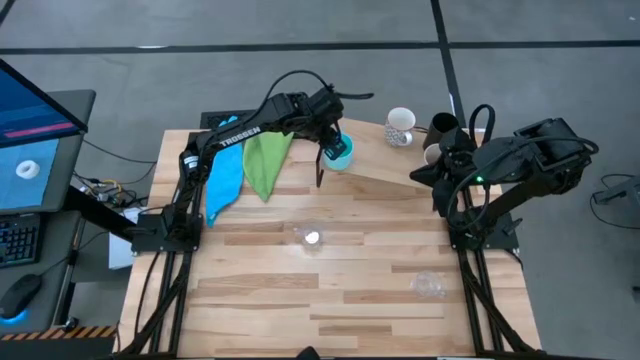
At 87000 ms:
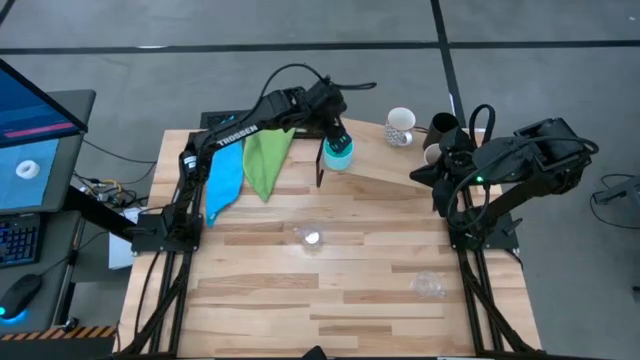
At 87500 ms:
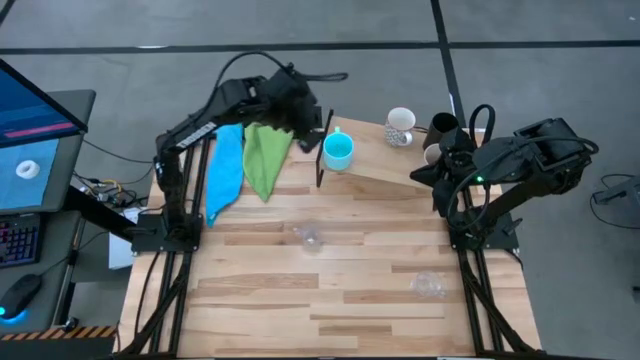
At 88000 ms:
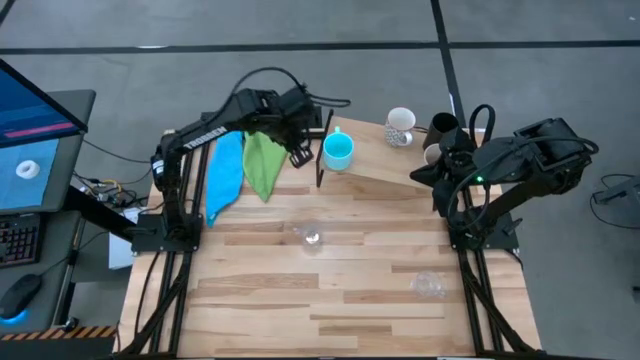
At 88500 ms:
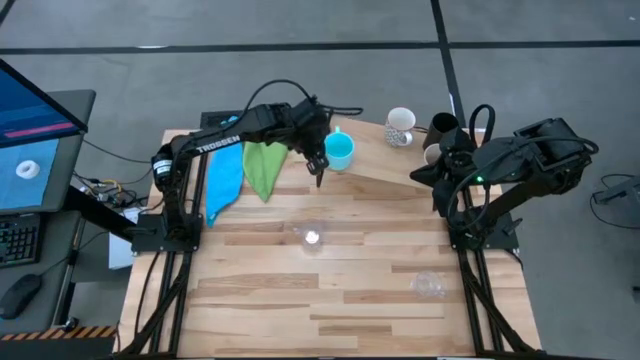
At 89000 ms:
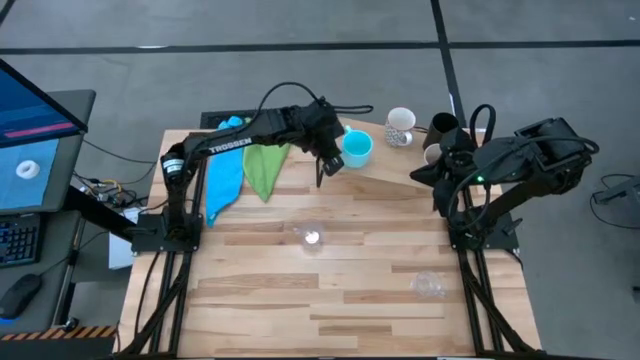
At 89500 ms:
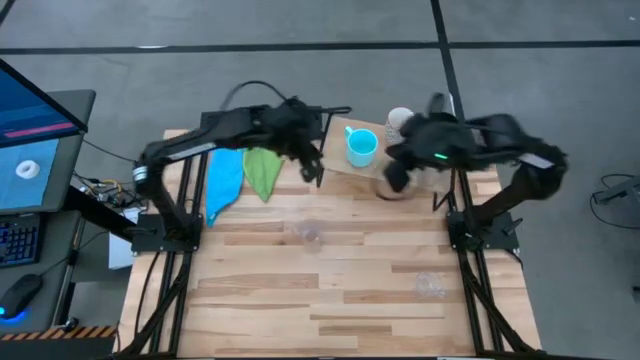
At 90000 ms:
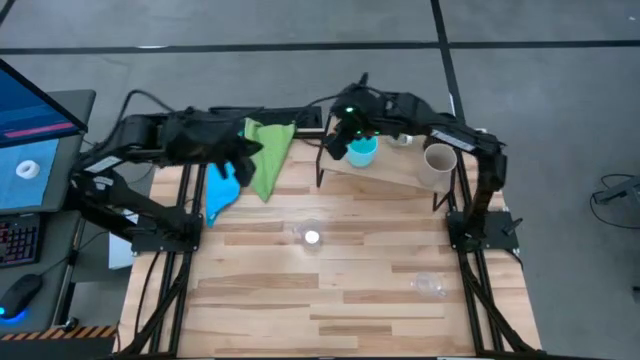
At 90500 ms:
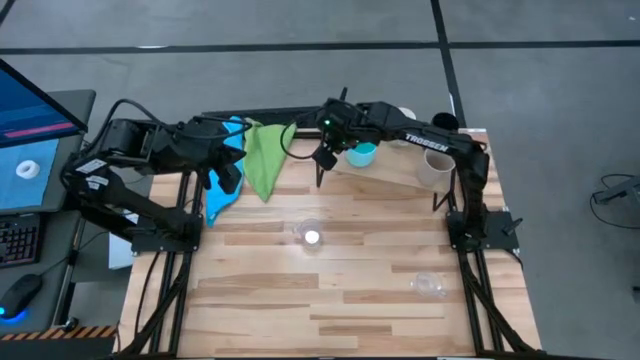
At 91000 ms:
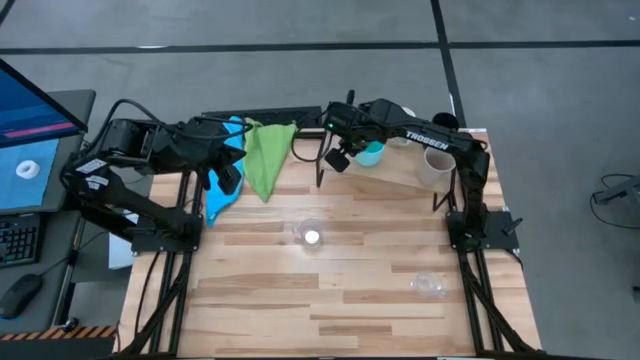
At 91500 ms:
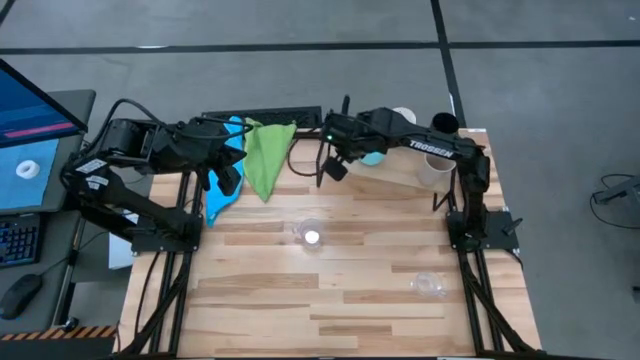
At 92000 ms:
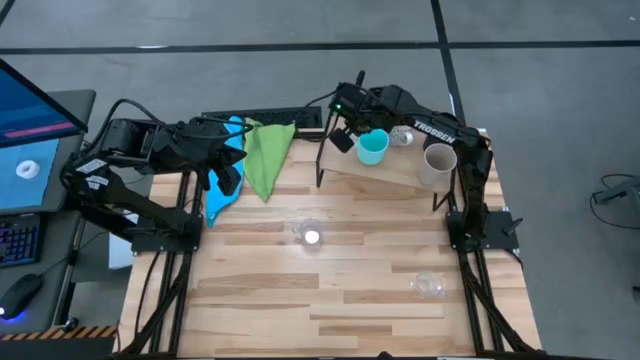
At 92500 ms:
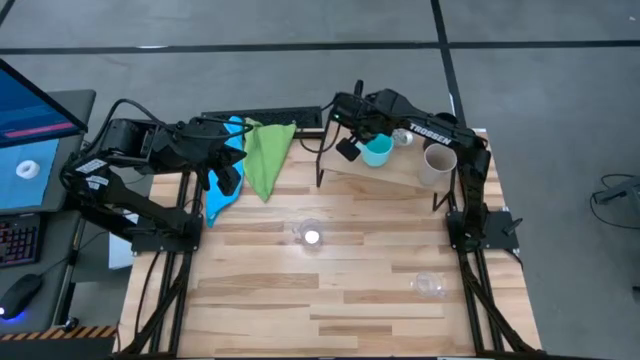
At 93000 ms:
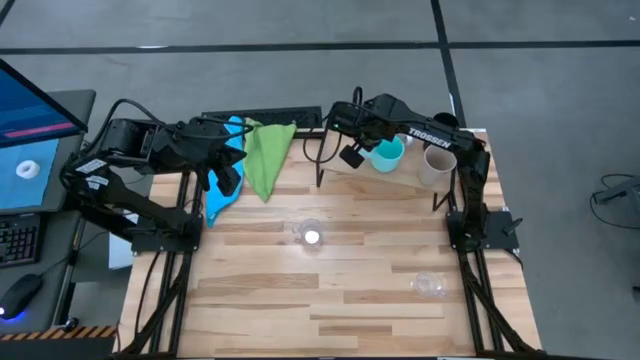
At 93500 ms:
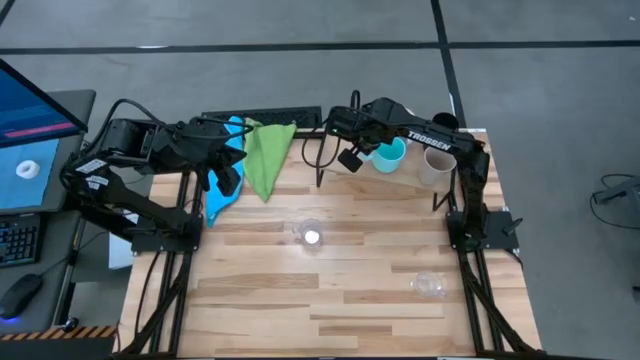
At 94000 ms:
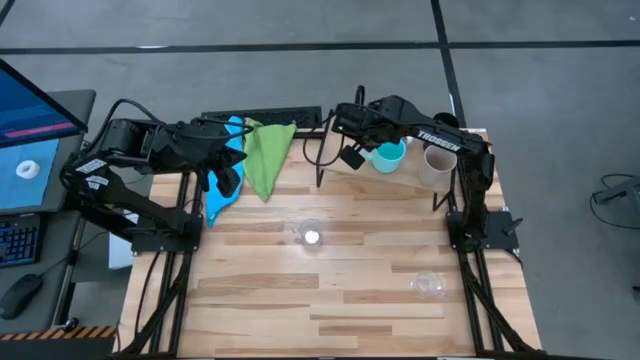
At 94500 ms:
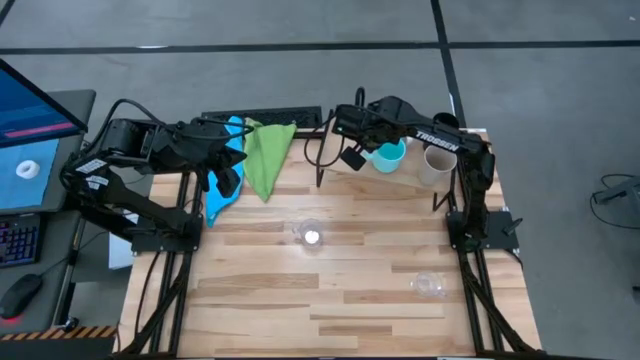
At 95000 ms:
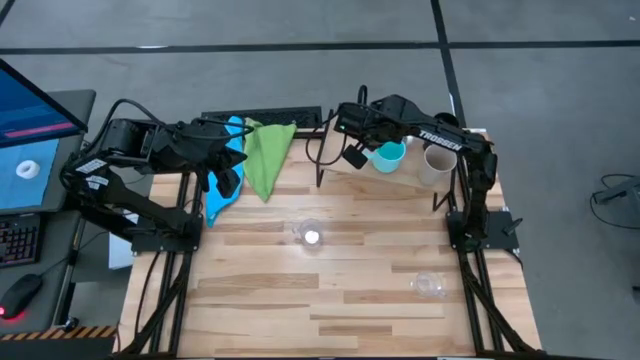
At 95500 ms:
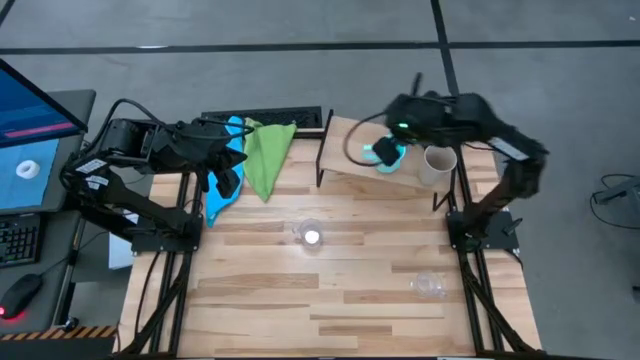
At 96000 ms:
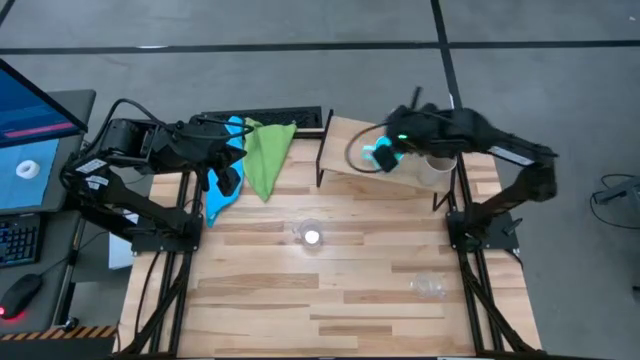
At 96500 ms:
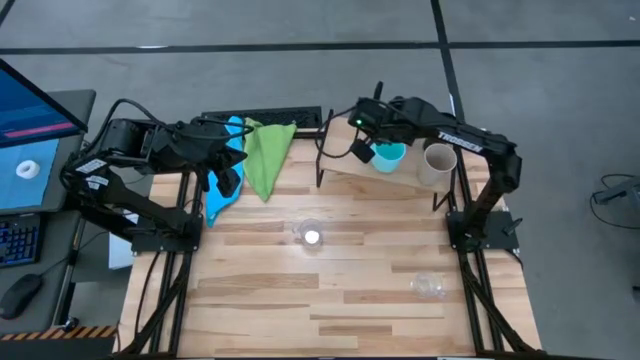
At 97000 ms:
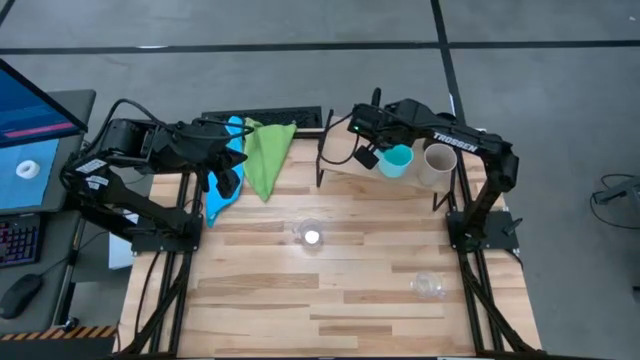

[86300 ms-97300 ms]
Task: Stack small to large cups/mugs on shelf
Move the blue mug to the center of the shelf

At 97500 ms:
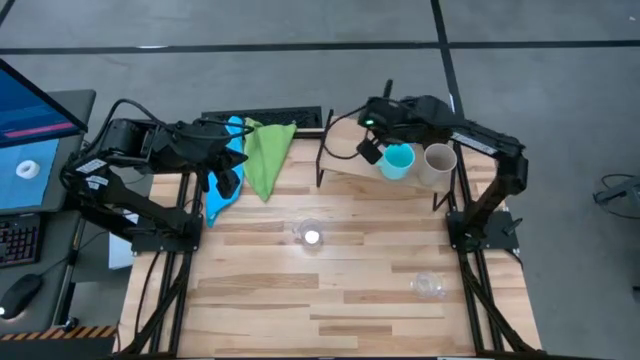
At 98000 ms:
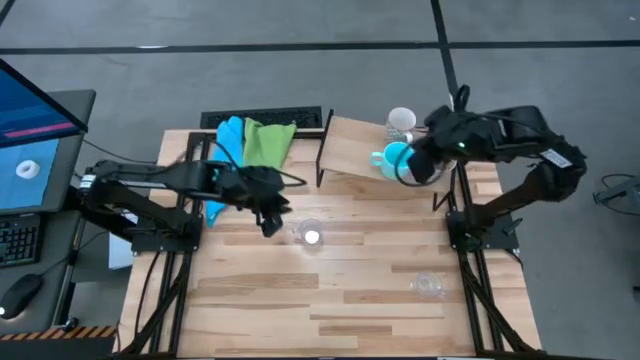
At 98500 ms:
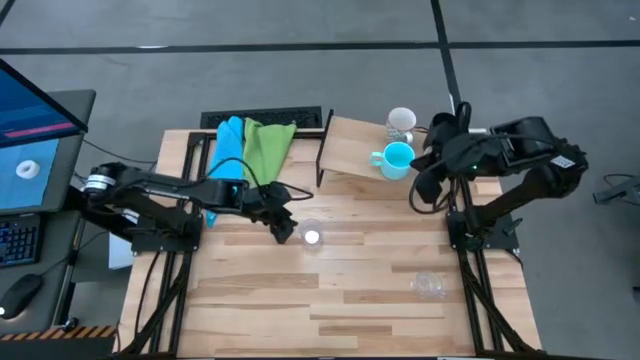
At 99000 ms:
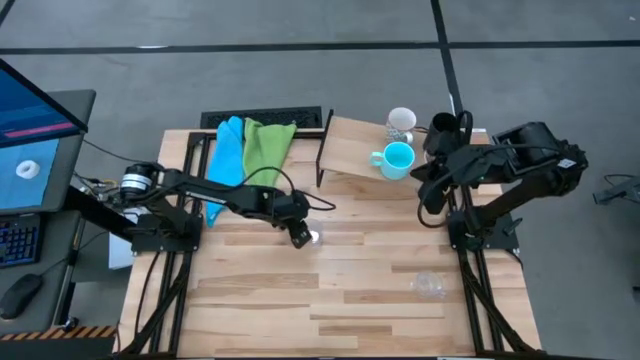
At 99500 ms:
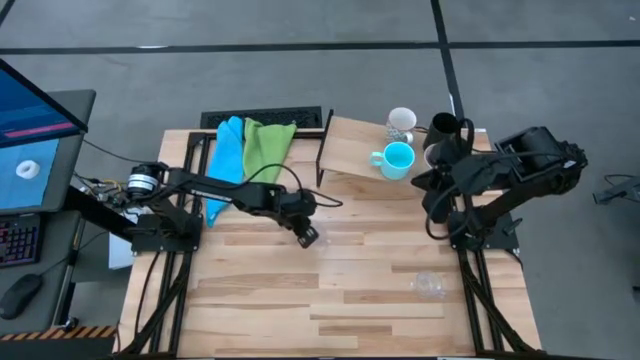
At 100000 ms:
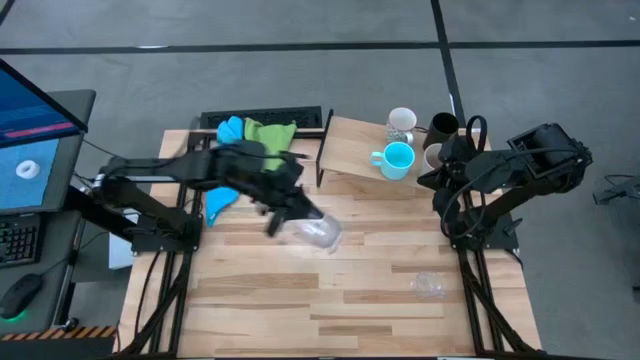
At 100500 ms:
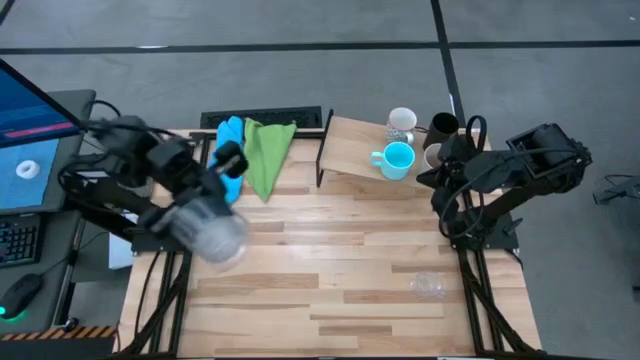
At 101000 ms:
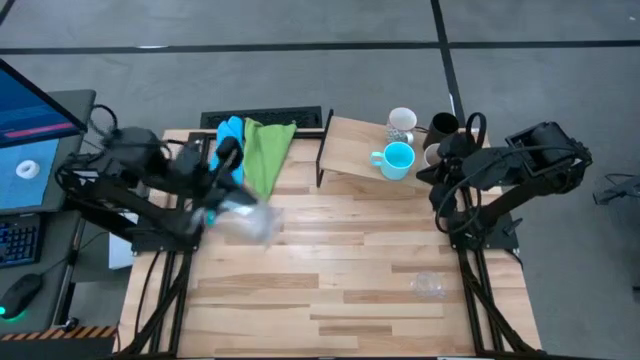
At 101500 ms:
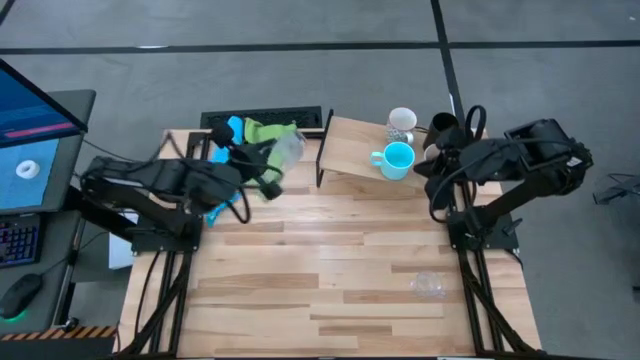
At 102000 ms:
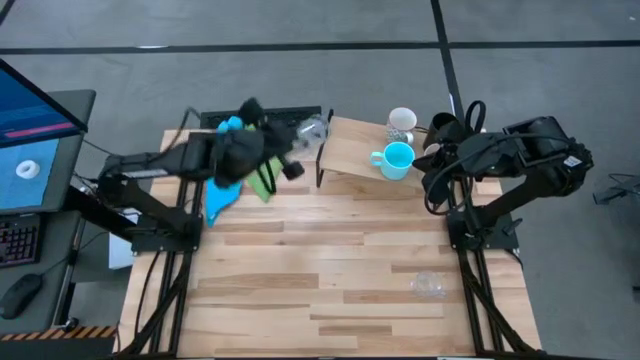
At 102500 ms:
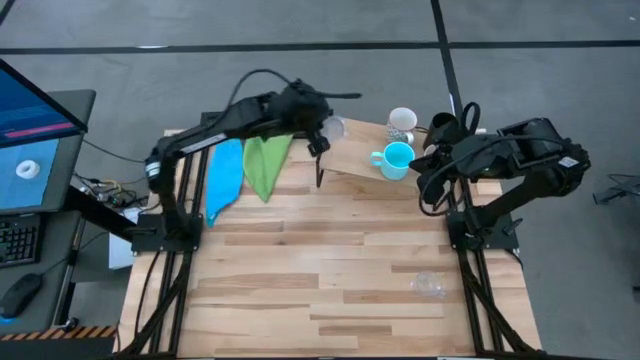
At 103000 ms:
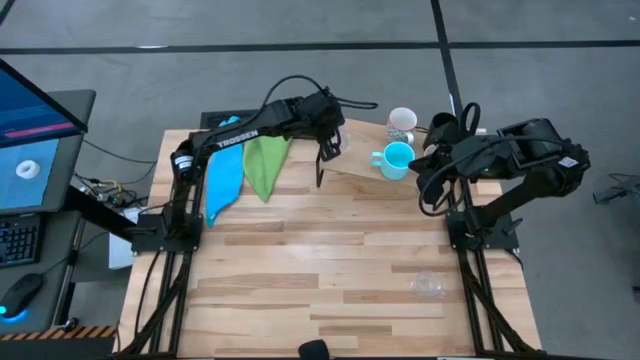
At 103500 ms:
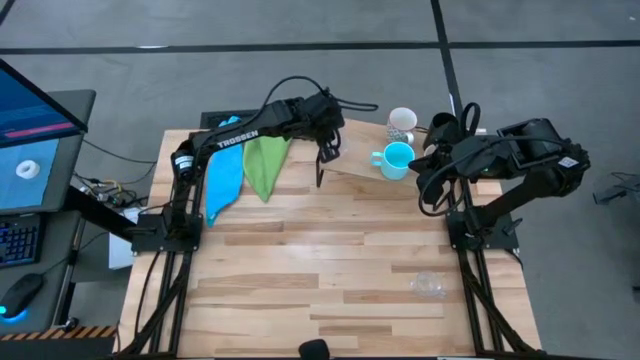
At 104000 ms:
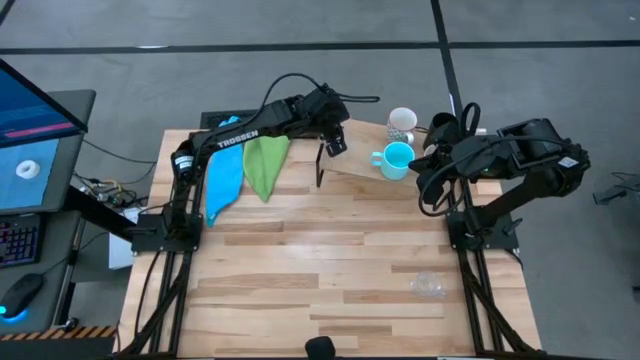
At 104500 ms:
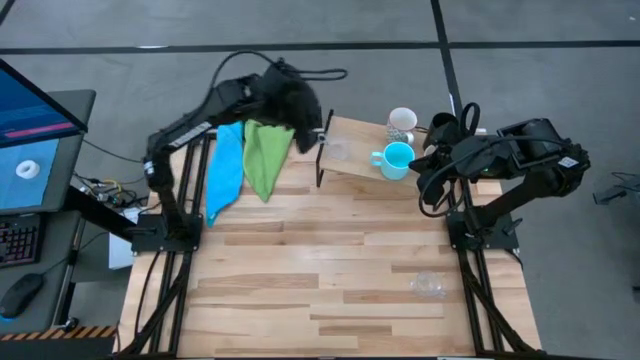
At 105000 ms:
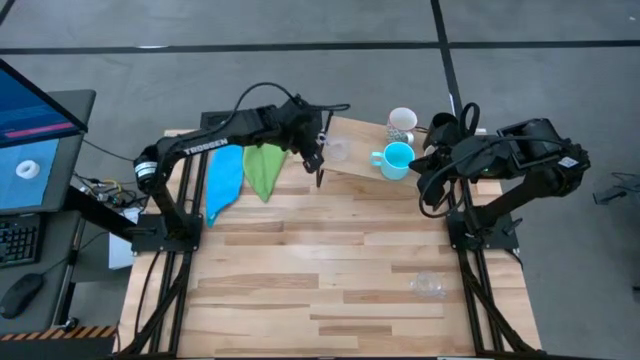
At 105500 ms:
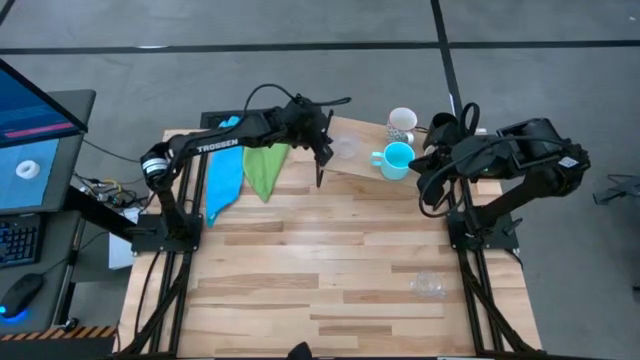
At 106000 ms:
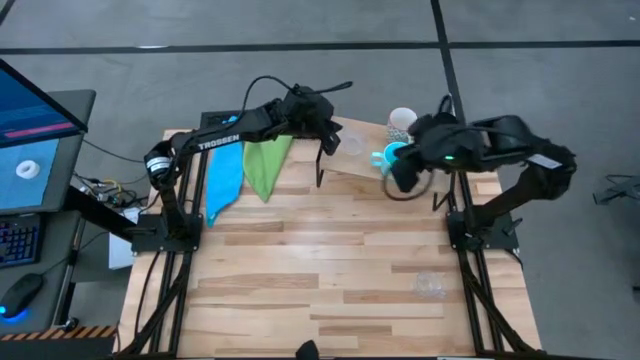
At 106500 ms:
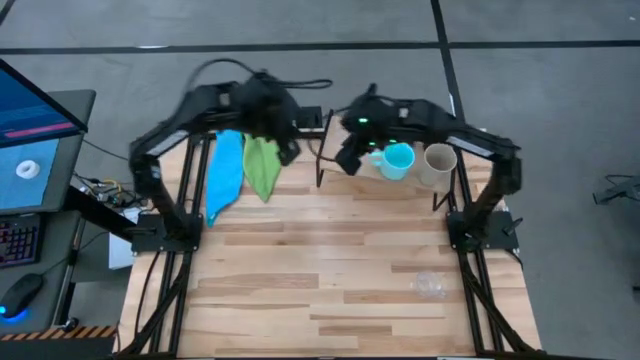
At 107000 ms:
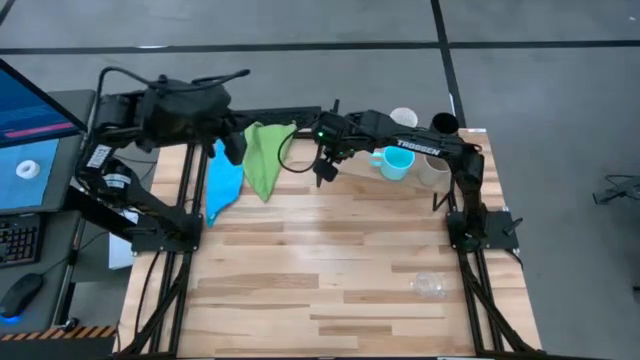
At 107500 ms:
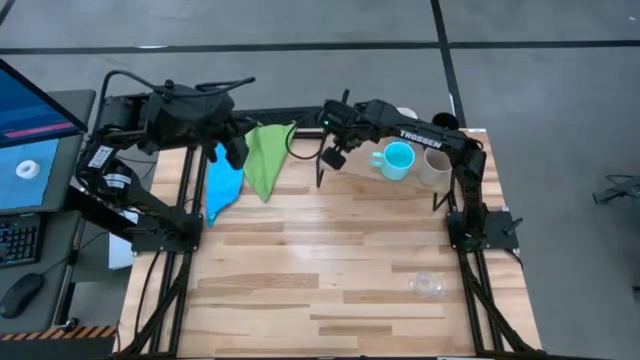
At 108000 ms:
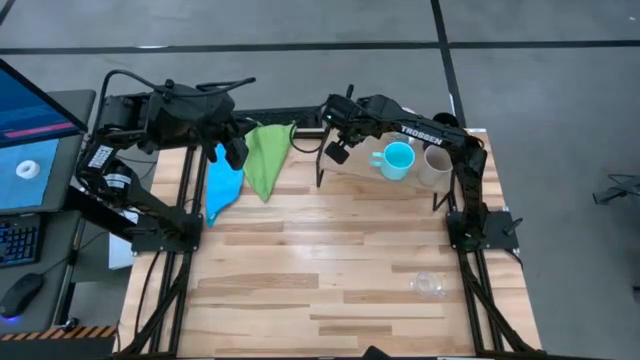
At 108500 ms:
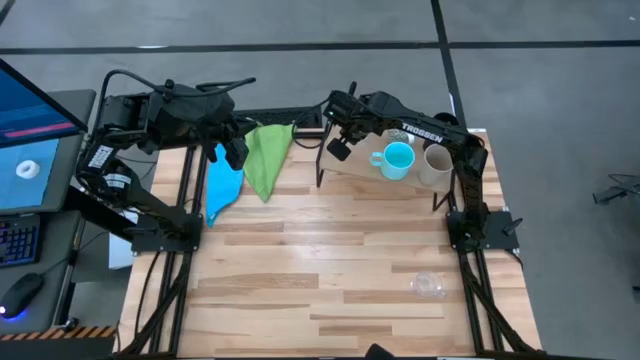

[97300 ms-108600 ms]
Put the left transparent mug on the shelf
